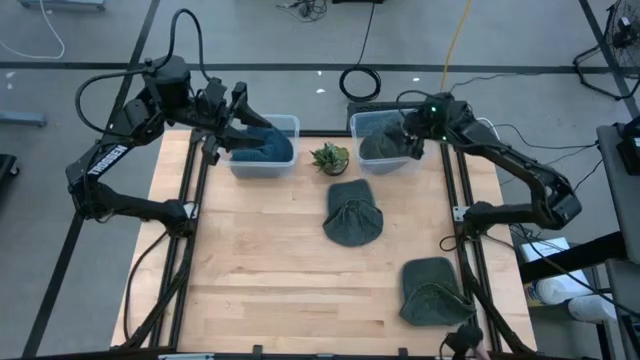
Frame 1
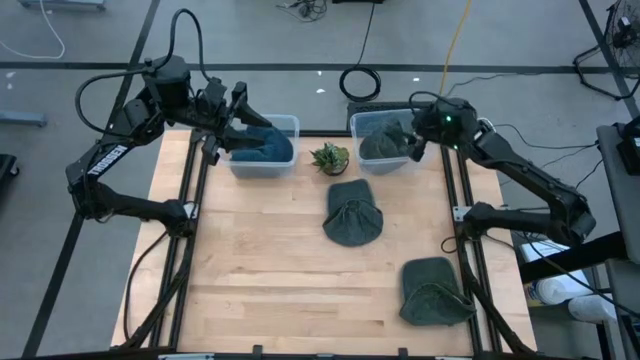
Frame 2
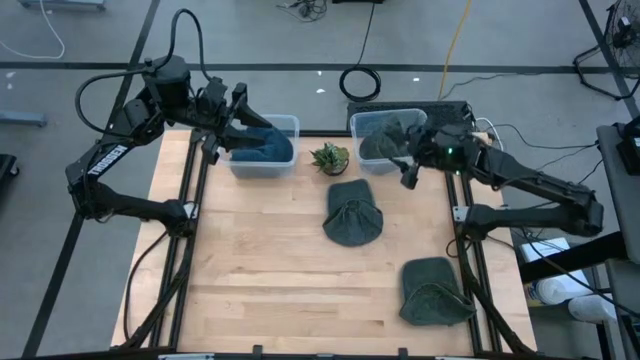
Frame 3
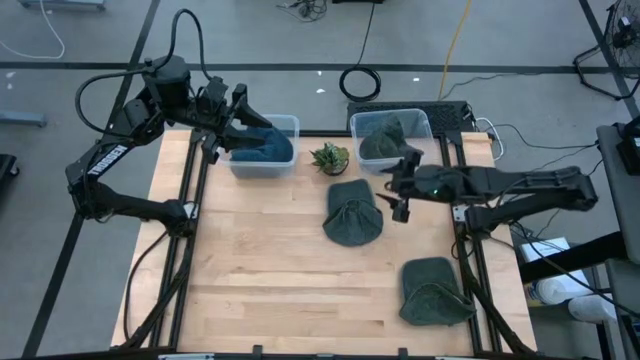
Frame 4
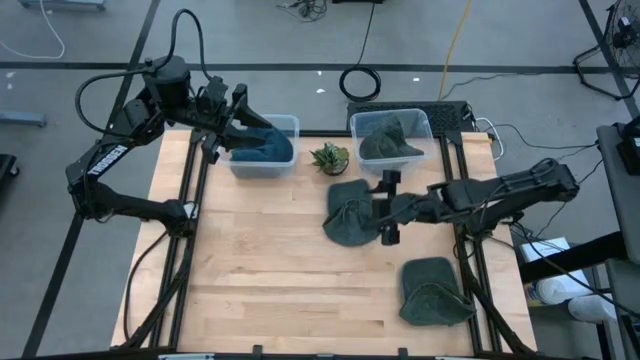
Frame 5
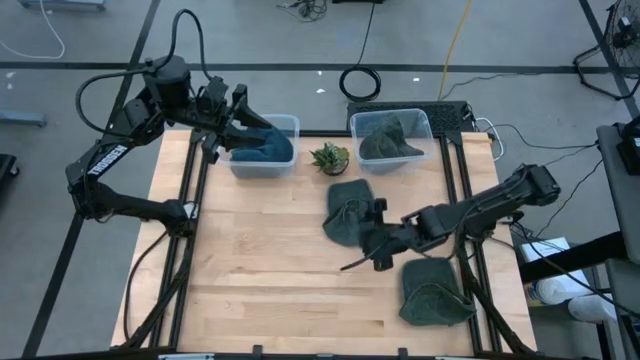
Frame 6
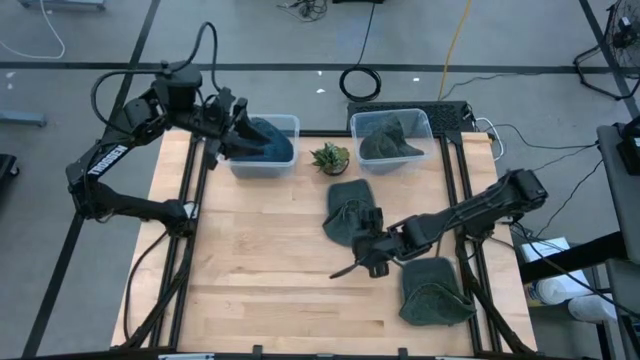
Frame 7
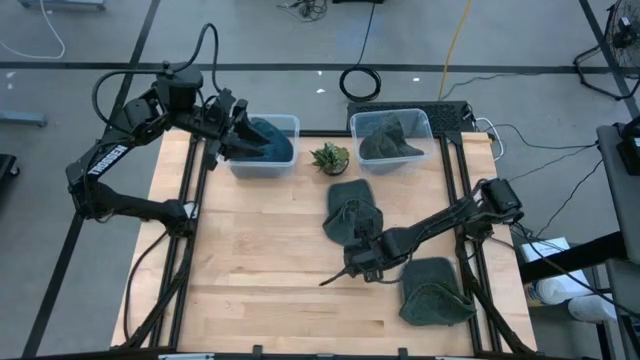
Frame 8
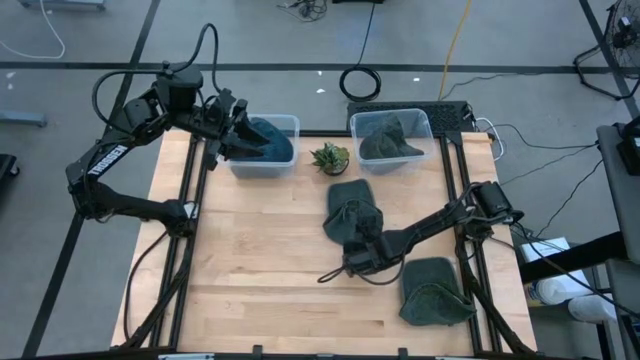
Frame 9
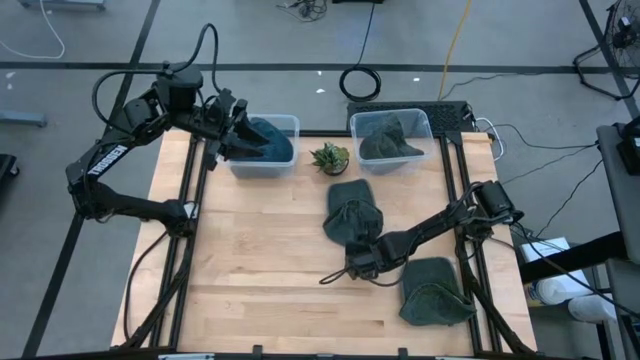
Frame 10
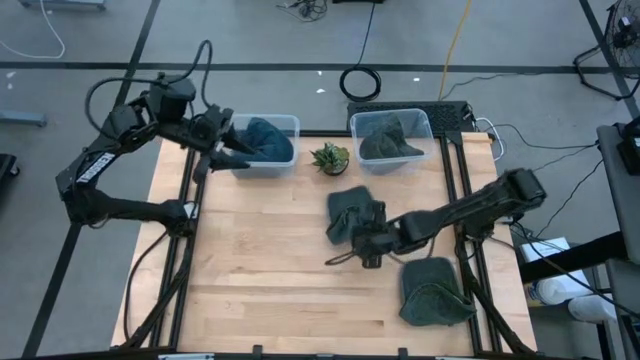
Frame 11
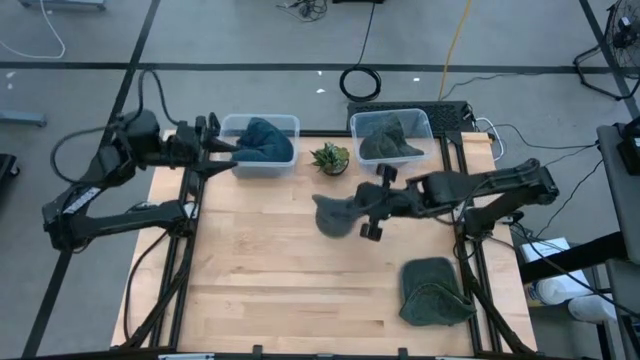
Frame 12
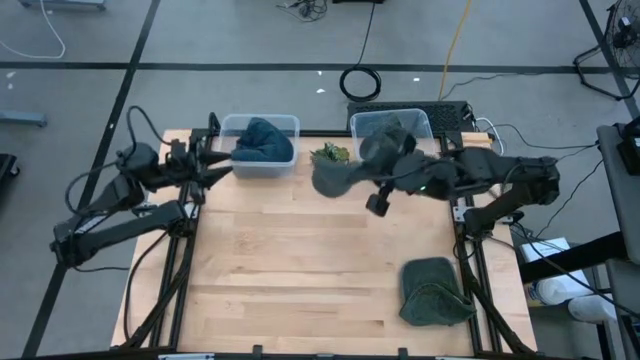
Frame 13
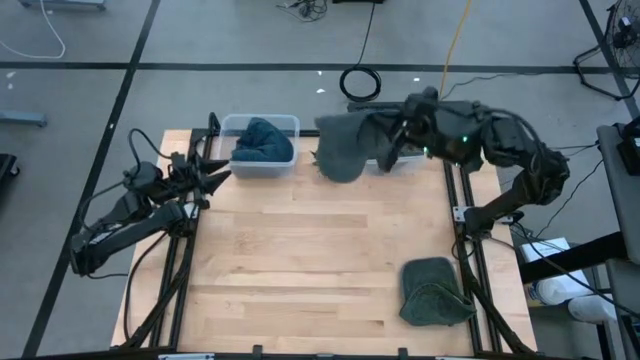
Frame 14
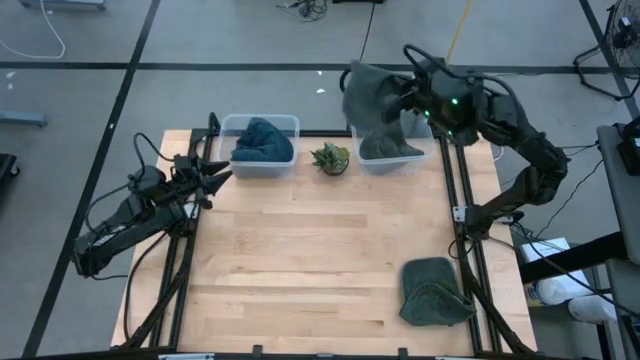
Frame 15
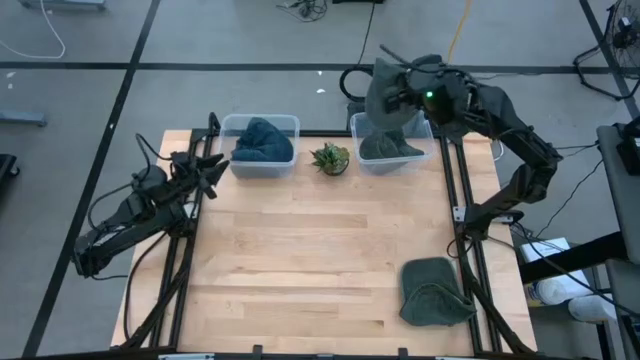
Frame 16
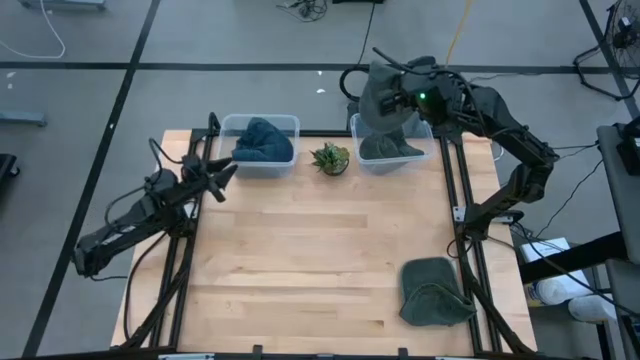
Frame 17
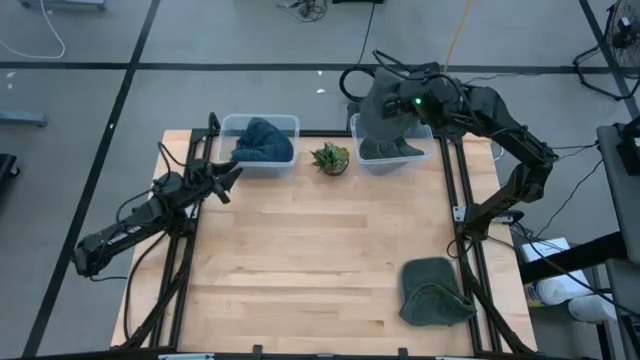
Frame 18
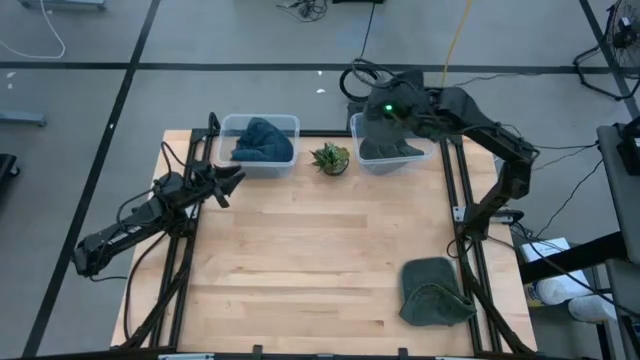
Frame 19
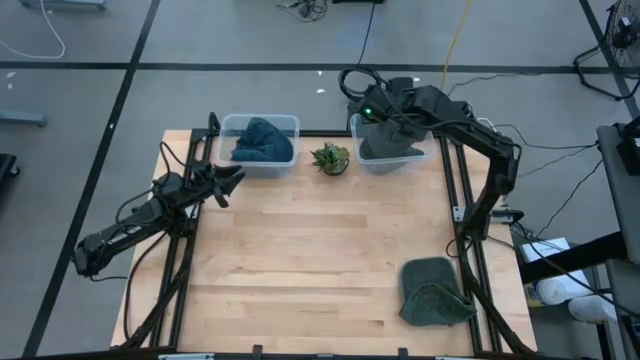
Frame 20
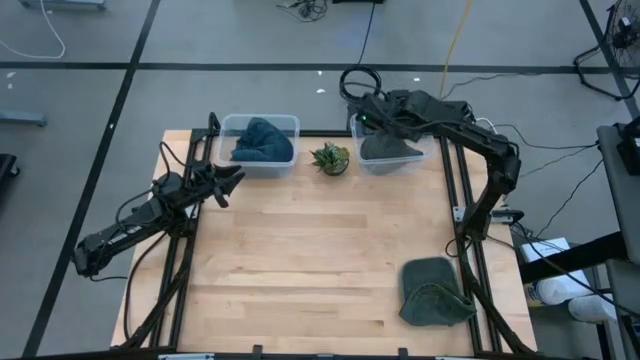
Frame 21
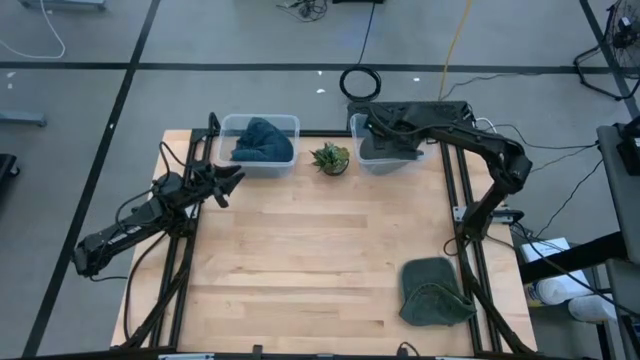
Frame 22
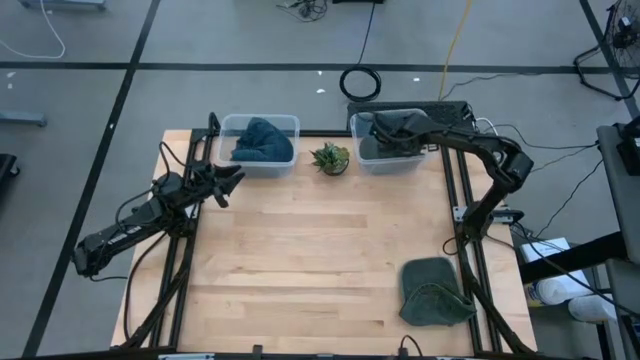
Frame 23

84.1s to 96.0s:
Task: Pick & Place hat
Put the top green cap into the right transparent bin

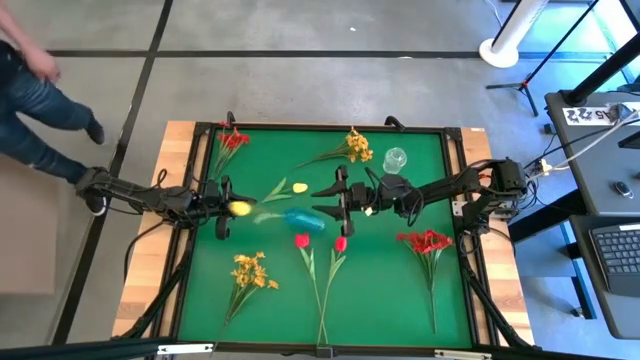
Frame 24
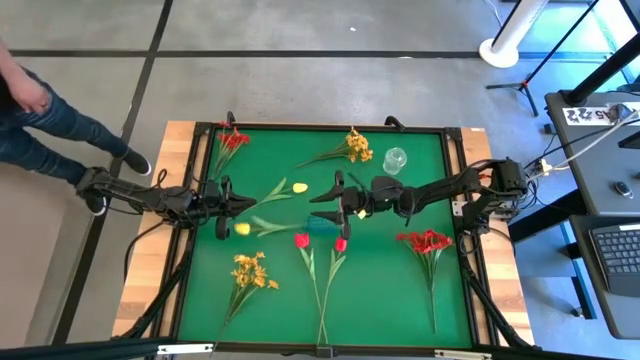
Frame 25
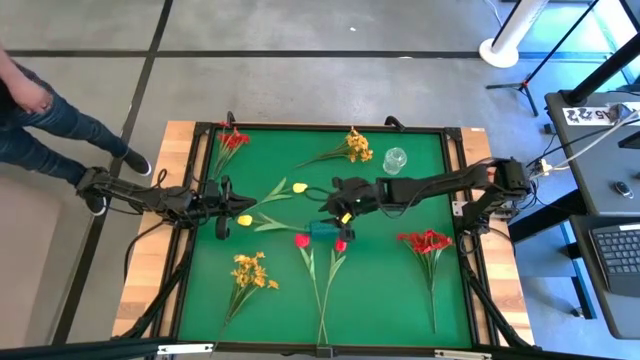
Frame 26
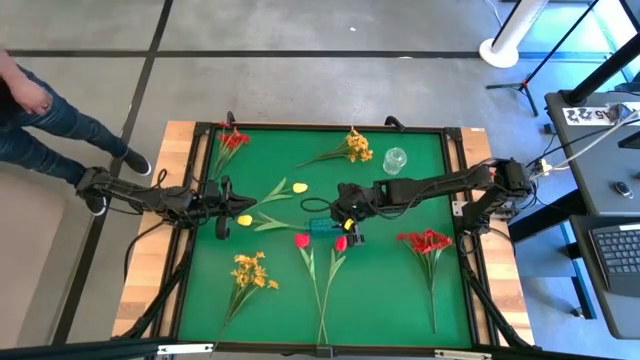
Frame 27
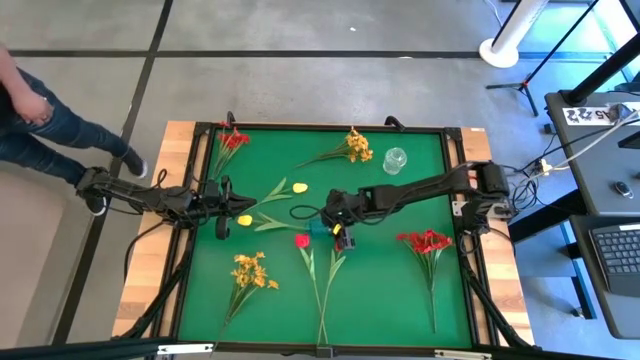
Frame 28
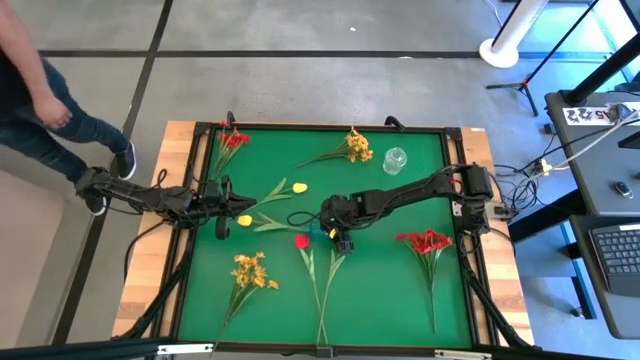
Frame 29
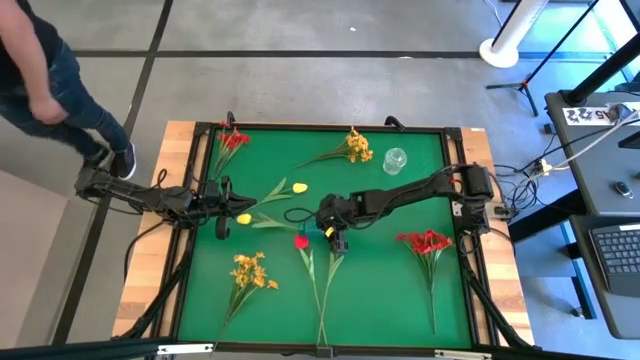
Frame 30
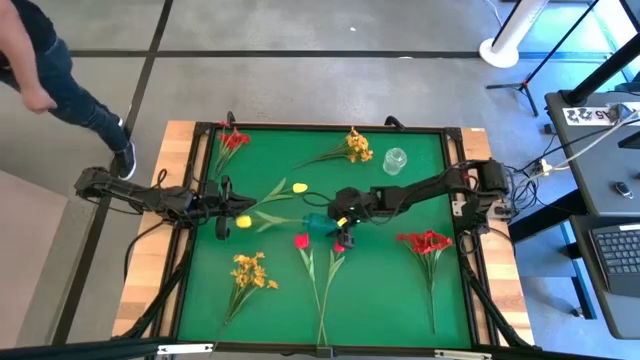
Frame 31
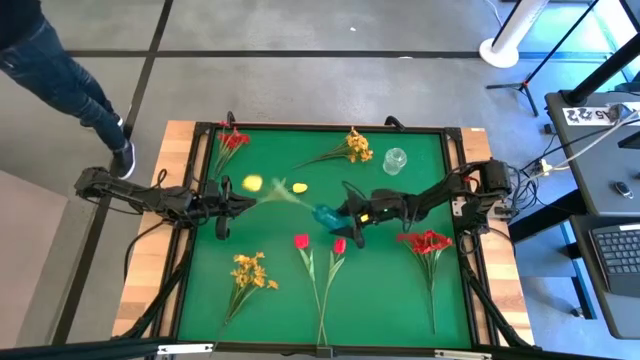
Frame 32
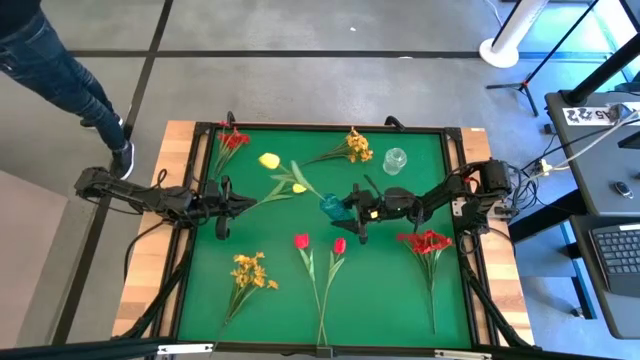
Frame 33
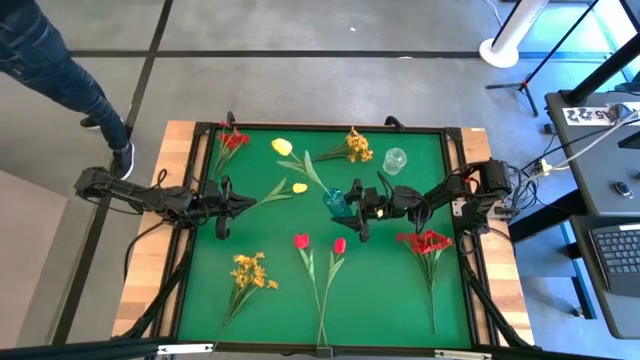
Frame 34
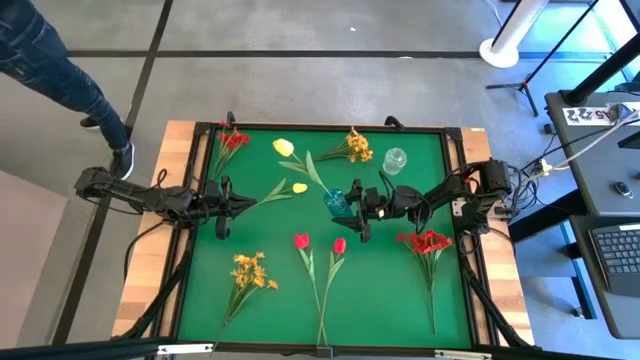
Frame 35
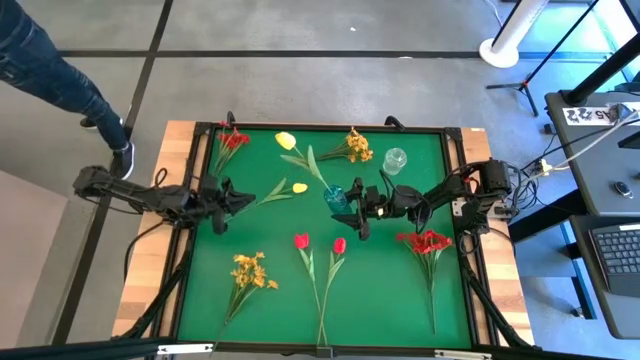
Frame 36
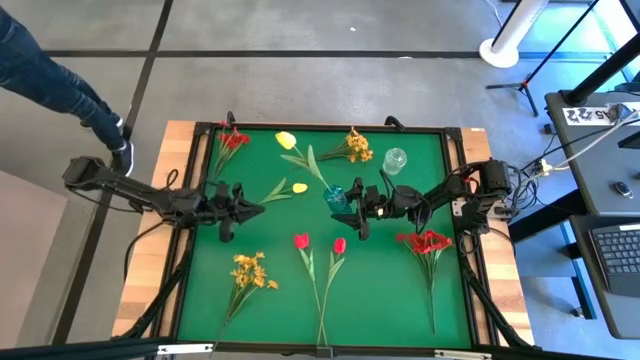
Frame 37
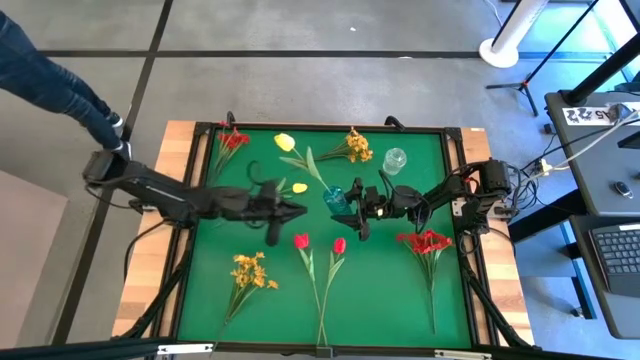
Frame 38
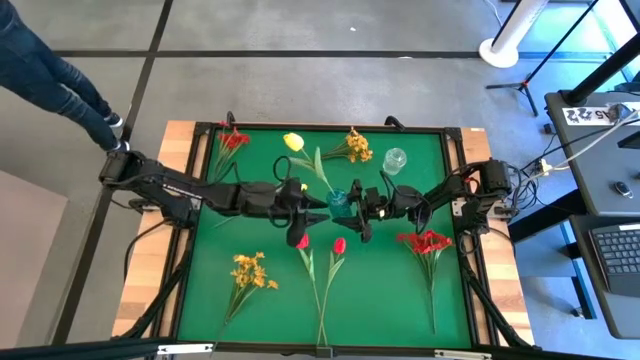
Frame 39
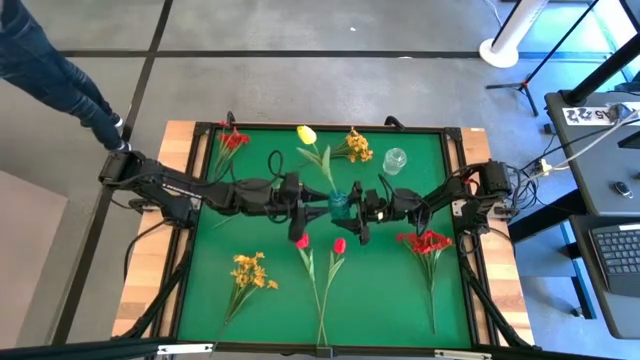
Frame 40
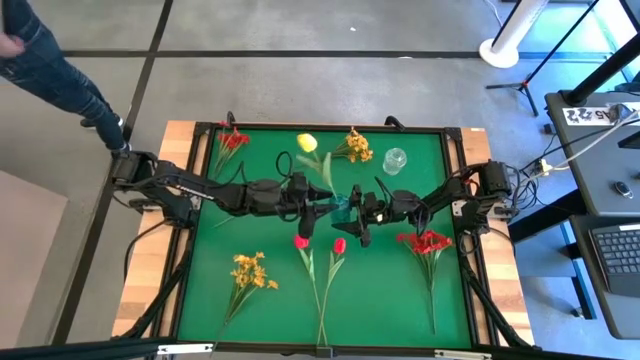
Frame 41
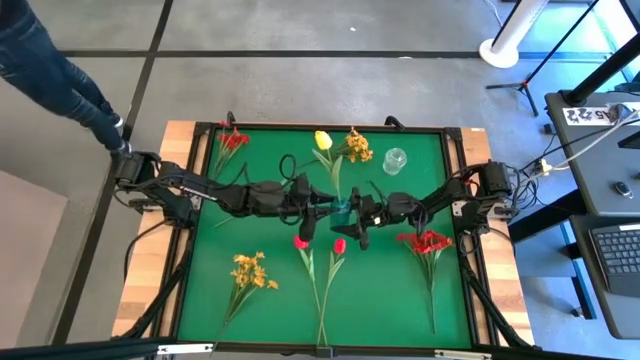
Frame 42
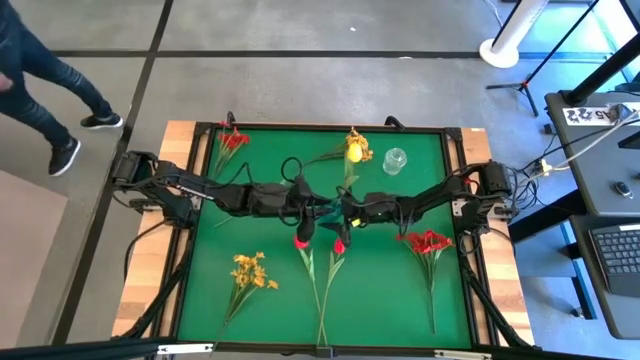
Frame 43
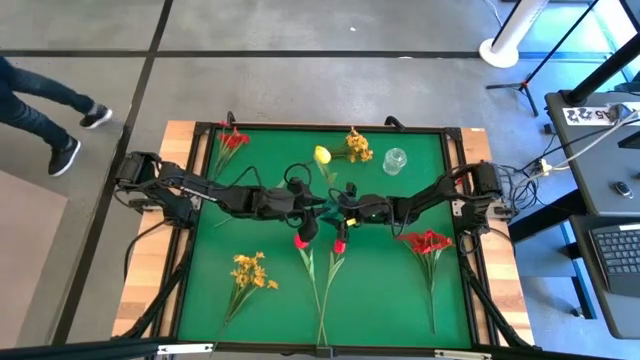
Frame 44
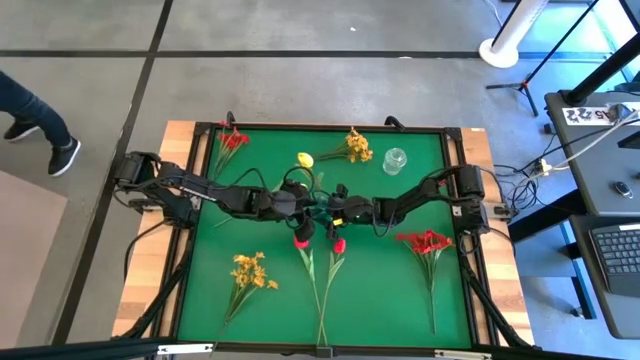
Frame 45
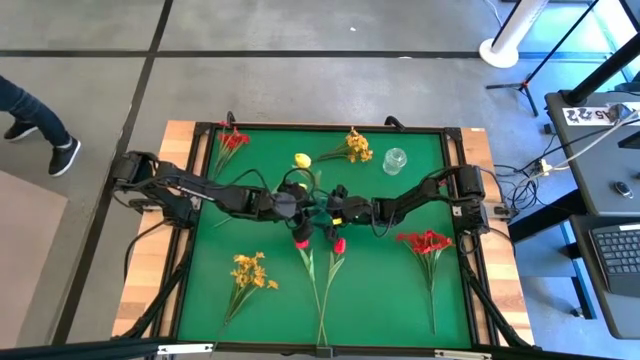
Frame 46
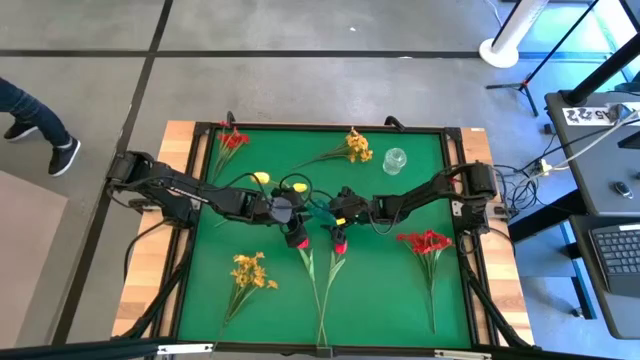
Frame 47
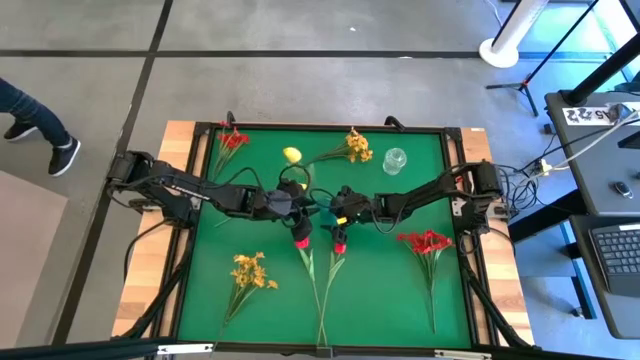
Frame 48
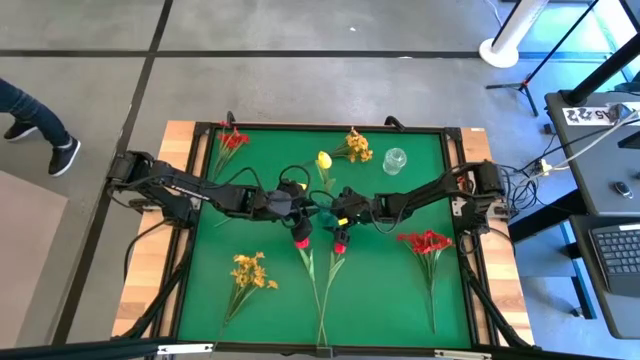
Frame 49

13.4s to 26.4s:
Task: Sort flowers into vase by color
Put the yellow flower into the blue vase
